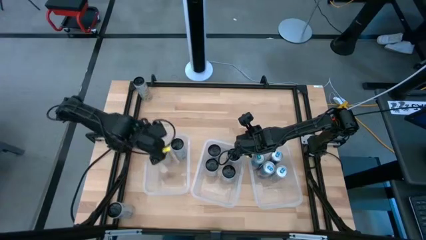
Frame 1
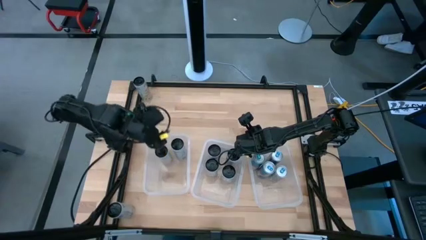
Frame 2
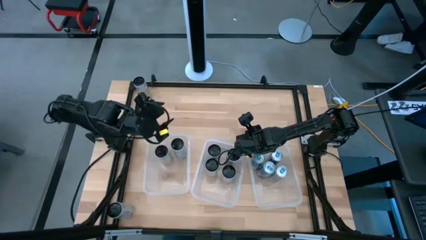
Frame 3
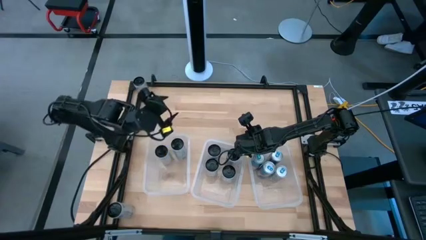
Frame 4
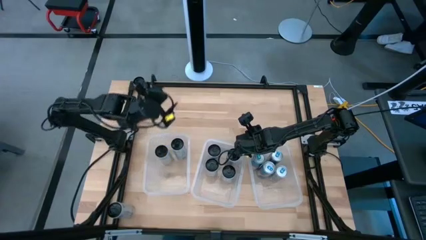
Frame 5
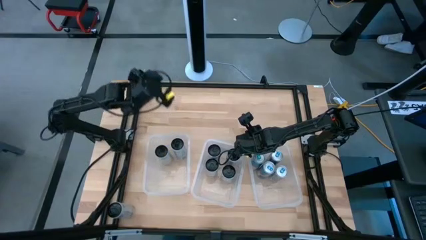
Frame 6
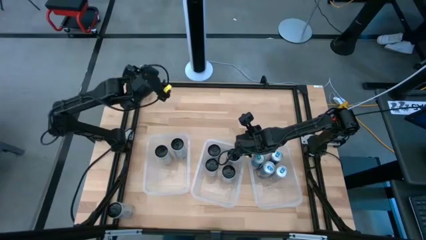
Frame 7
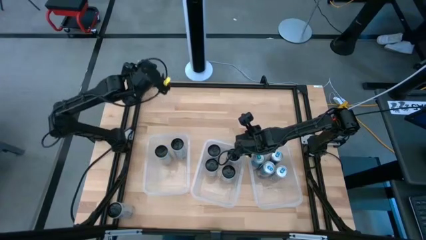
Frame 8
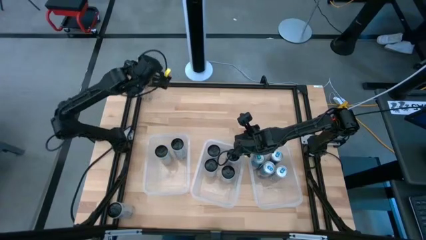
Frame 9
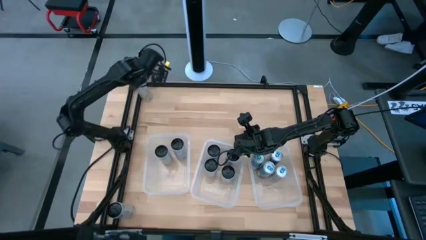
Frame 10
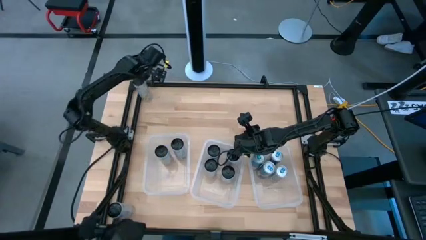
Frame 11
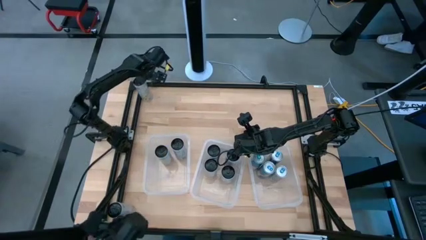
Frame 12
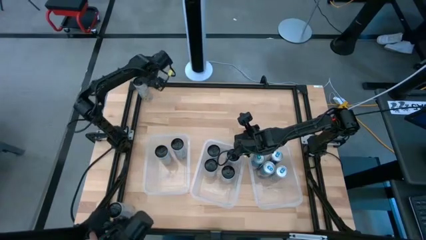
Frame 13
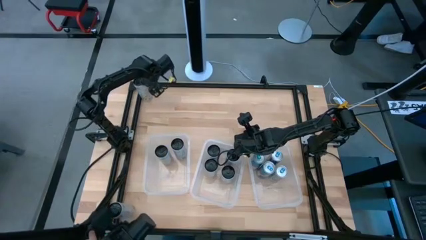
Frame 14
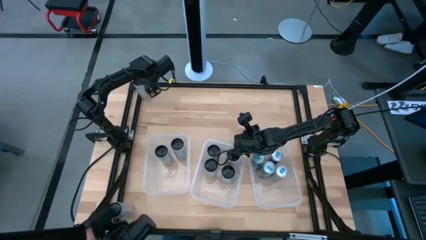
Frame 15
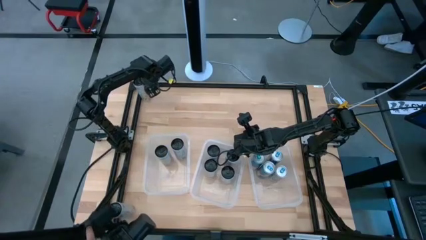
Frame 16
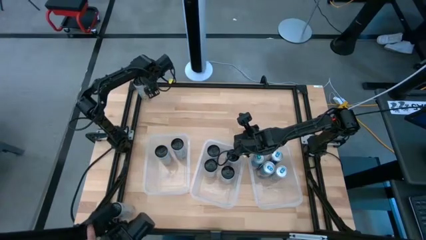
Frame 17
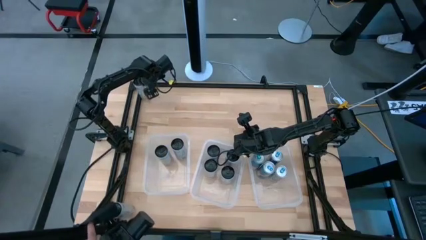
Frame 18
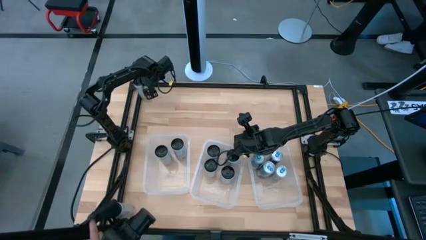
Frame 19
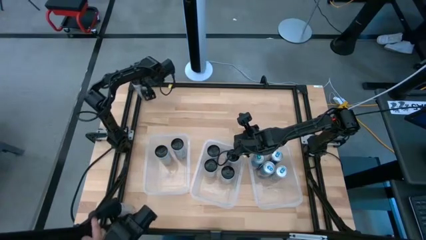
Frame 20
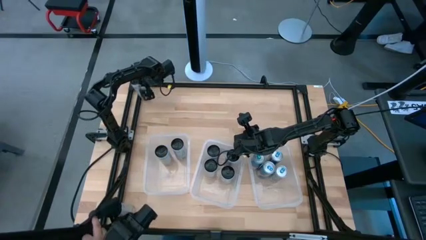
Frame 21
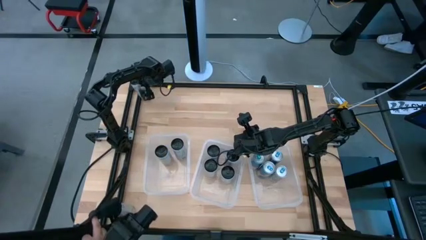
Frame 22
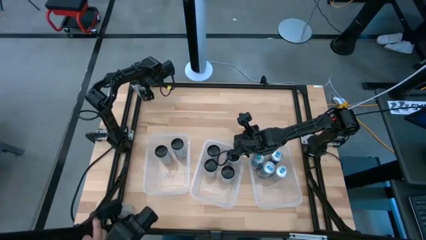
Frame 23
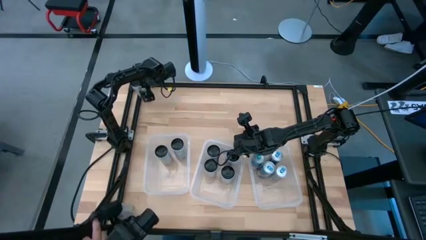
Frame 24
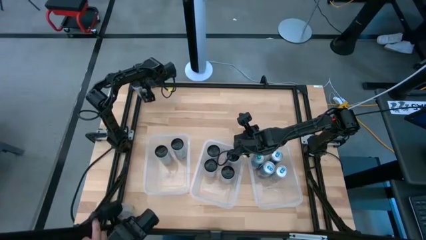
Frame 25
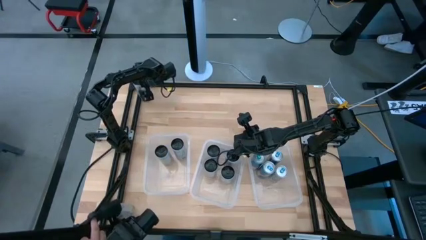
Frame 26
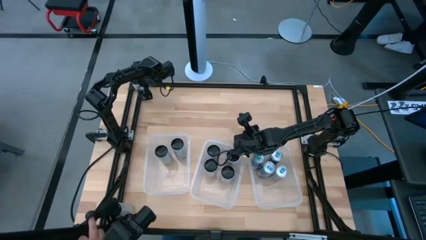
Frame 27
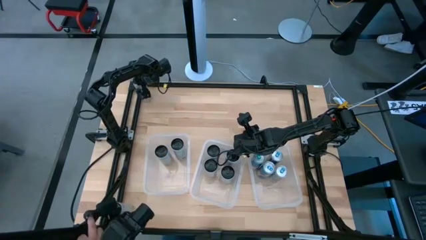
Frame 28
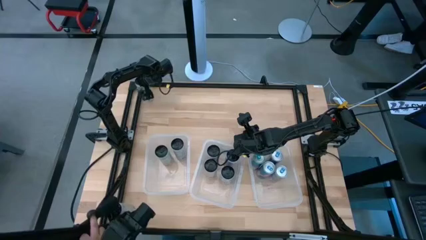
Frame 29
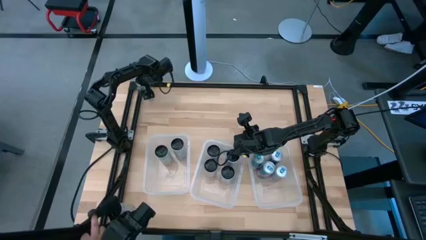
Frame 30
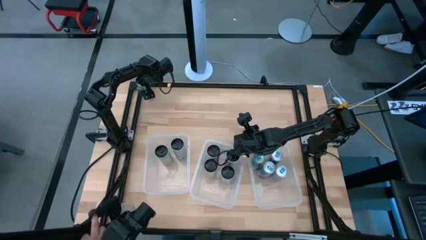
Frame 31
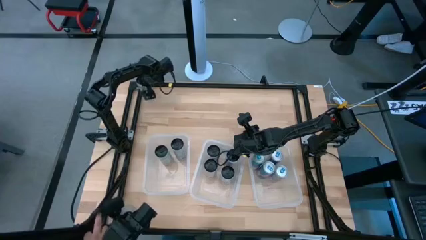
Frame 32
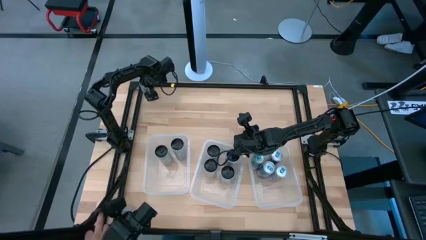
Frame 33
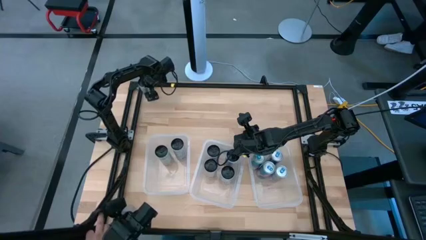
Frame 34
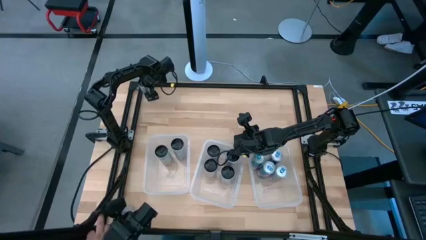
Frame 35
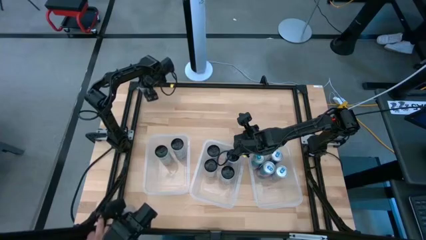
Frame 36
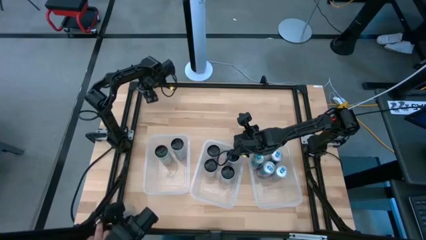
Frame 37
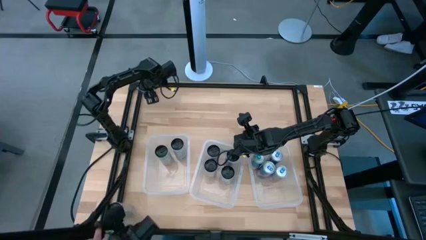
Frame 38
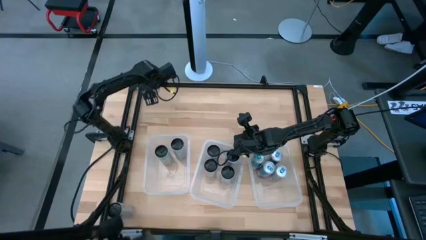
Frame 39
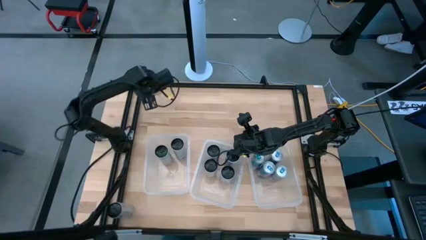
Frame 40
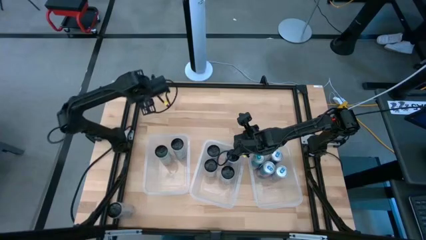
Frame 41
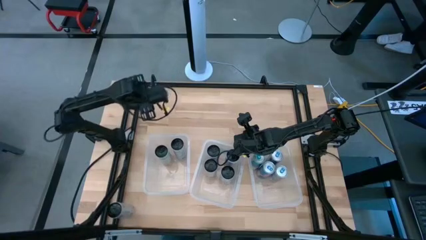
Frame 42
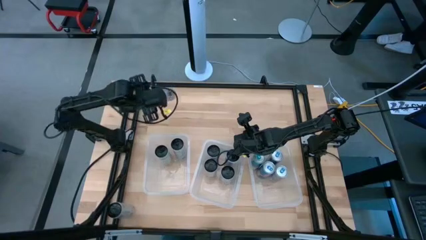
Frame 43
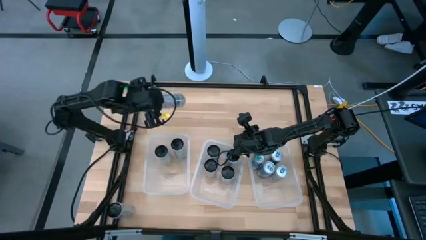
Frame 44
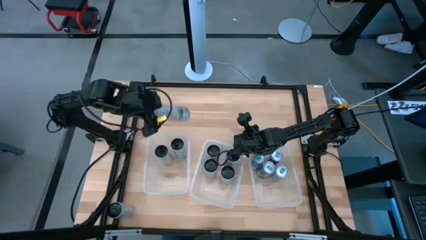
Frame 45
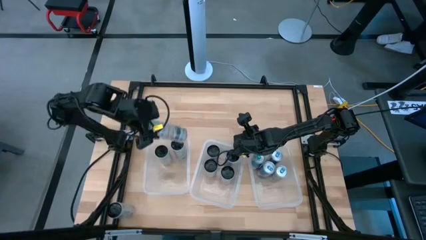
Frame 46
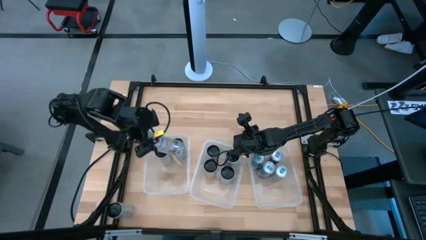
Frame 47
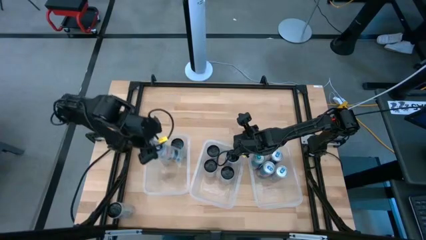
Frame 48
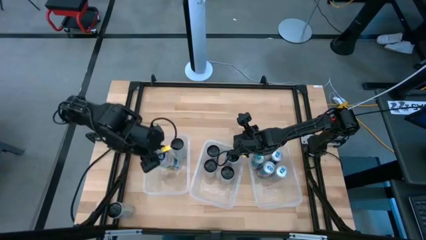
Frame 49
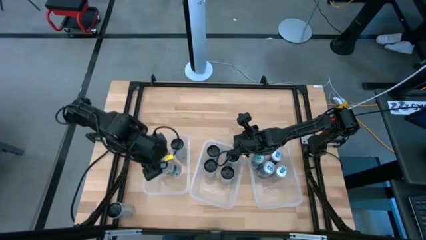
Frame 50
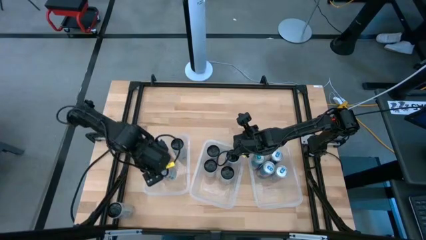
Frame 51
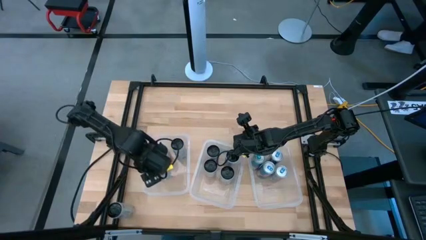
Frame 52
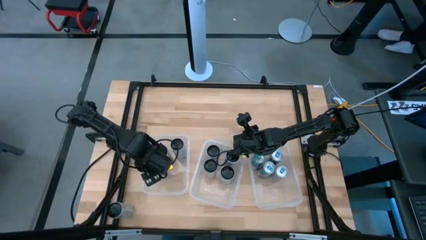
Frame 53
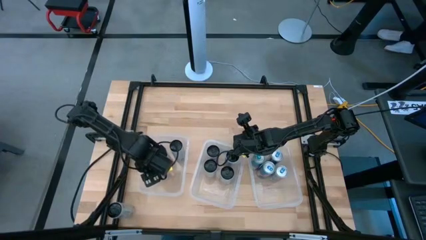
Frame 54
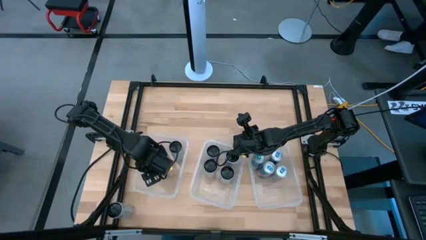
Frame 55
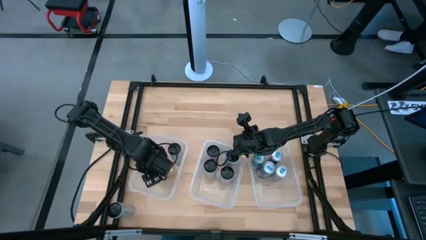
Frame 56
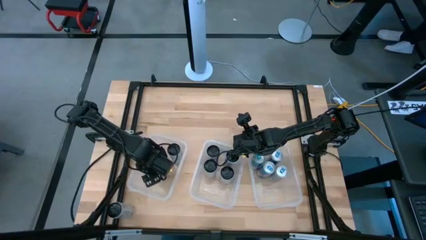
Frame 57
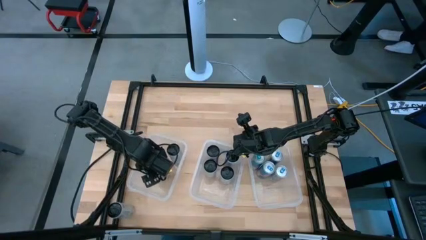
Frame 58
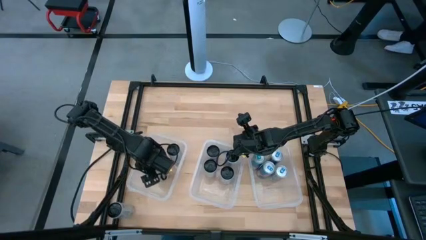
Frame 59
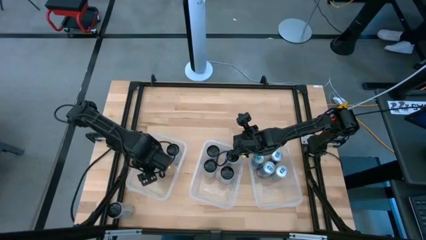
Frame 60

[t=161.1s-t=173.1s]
Task: Sort soda cans
Put the top white-yellow soda can into the left transparent bin
